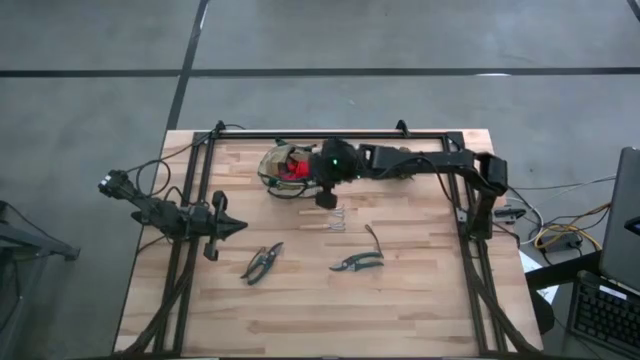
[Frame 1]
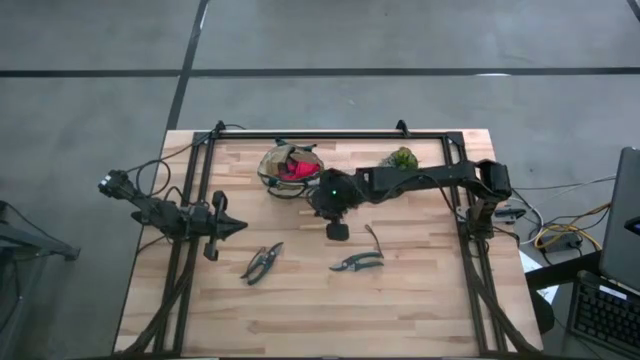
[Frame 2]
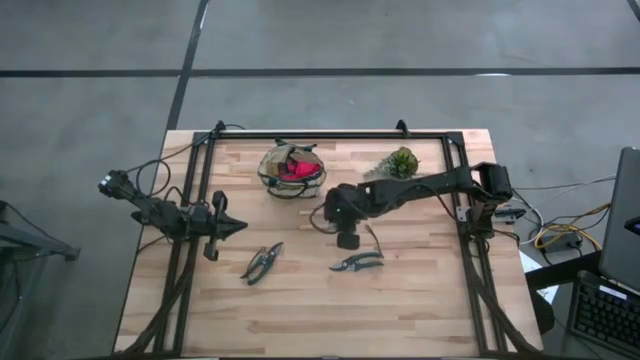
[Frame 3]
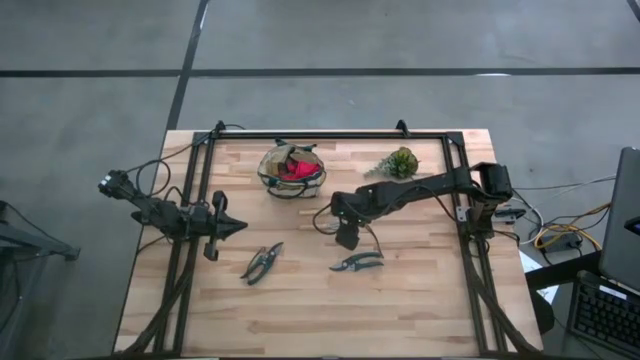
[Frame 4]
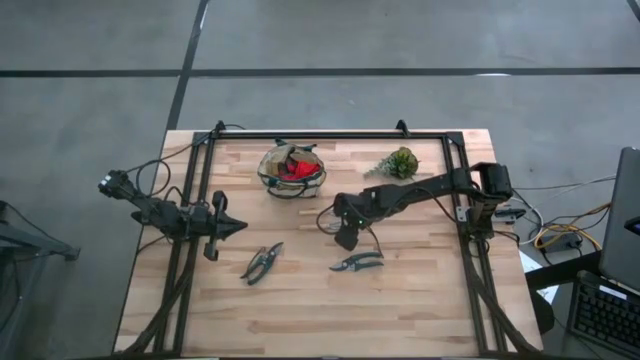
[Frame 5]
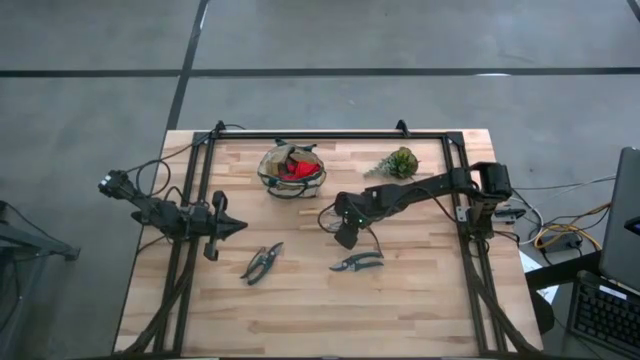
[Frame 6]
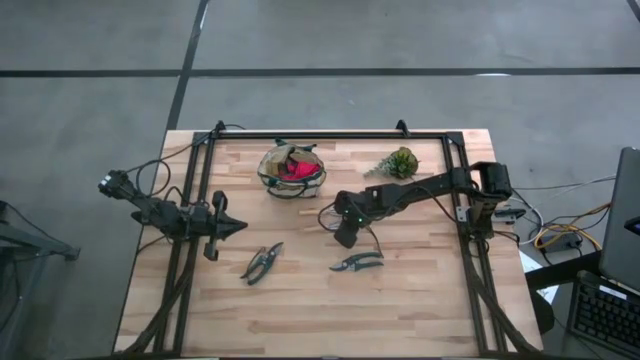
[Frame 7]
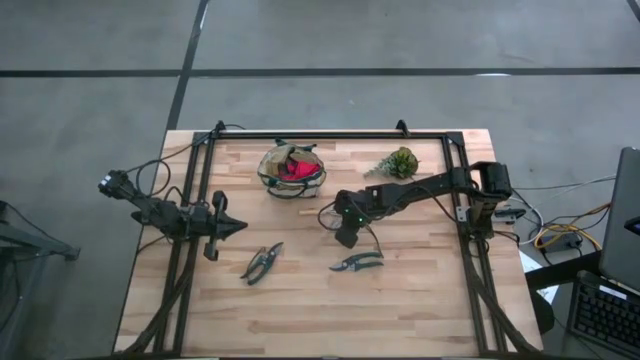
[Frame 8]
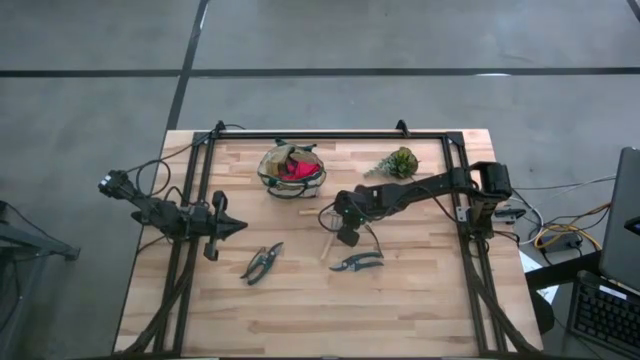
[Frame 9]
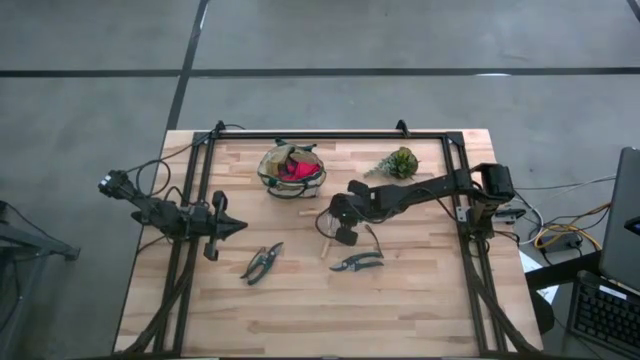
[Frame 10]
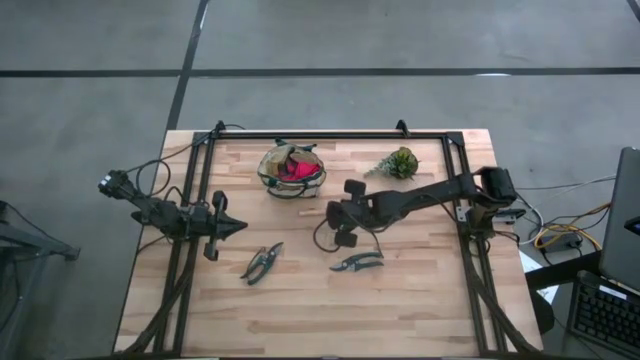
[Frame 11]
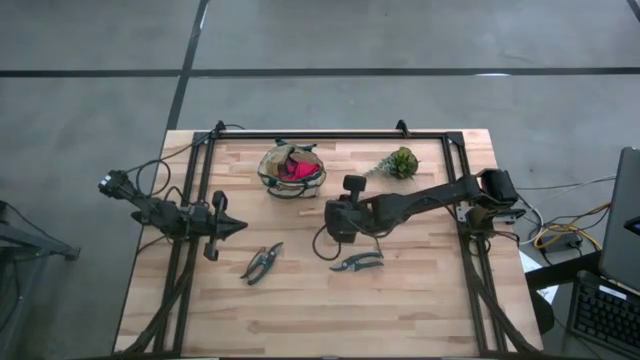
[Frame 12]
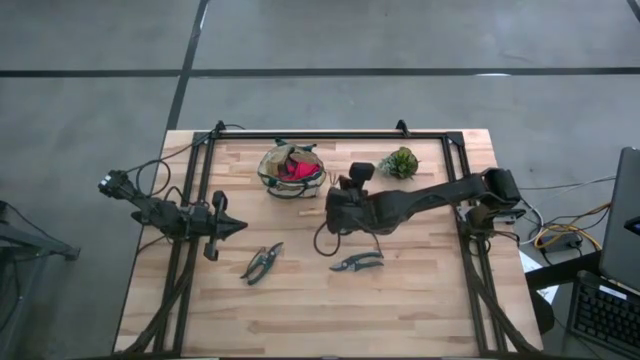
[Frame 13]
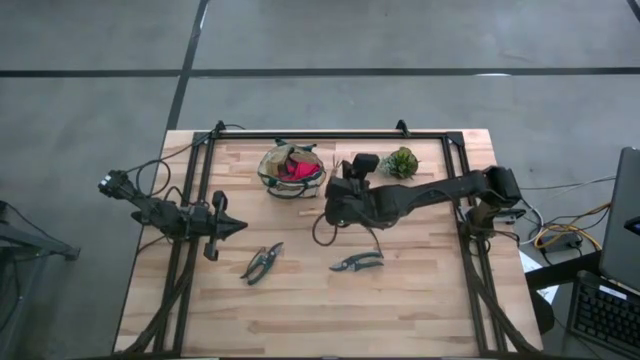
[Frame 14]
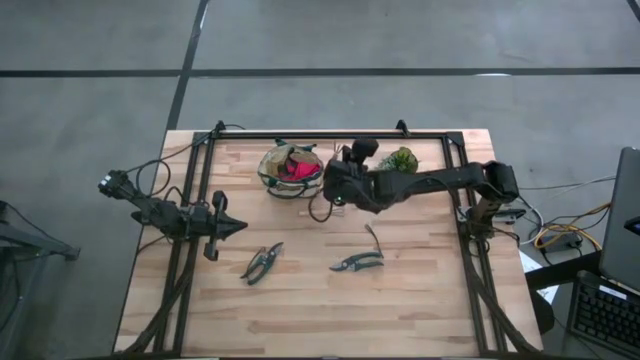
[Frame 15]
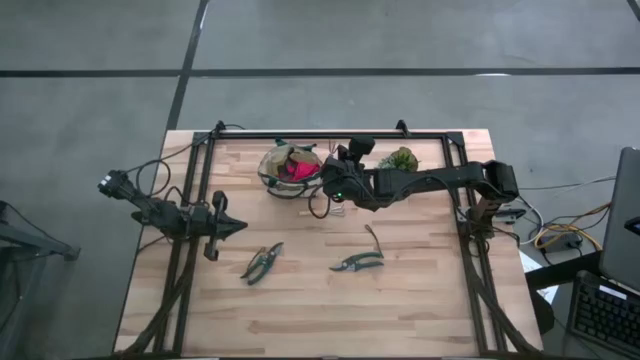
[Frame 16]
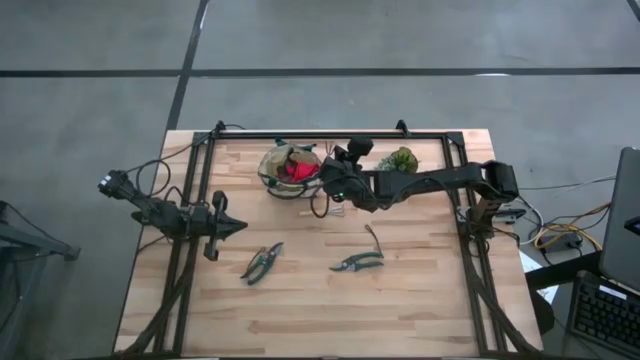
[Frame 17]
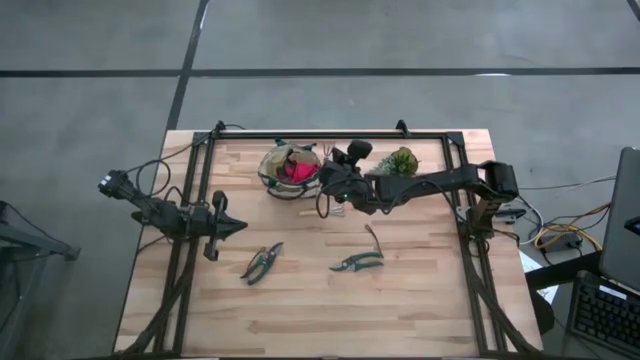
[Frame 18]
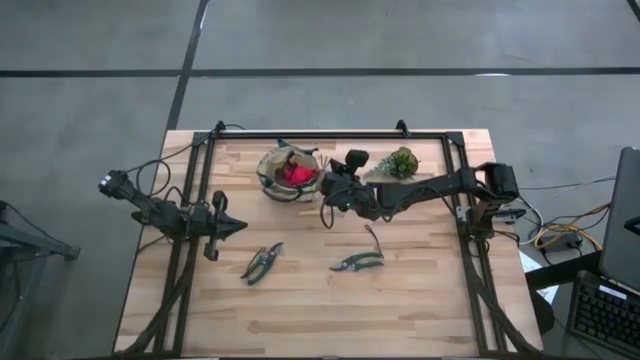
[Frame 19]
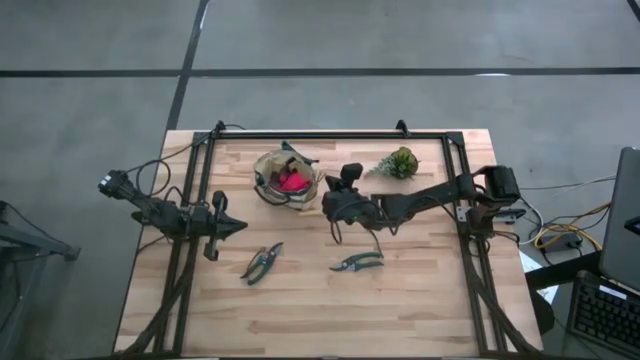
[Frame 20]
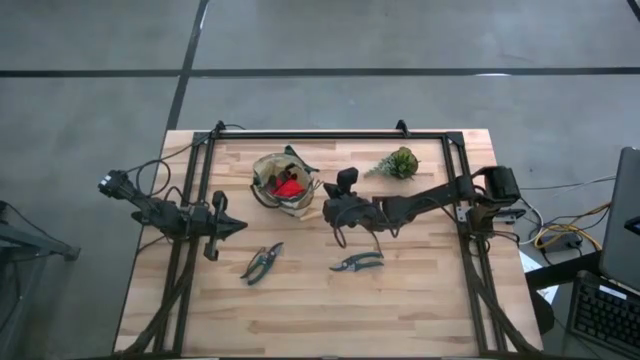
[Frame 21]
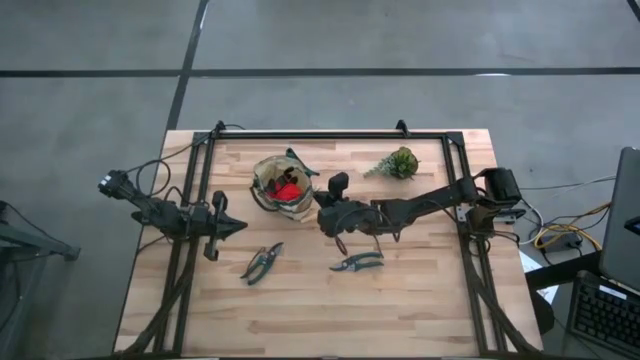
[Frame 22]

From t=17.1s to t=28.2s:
Task: Pick & Place Garden tools in Gardening bag
Put the bottom hand rake into the gardening bag

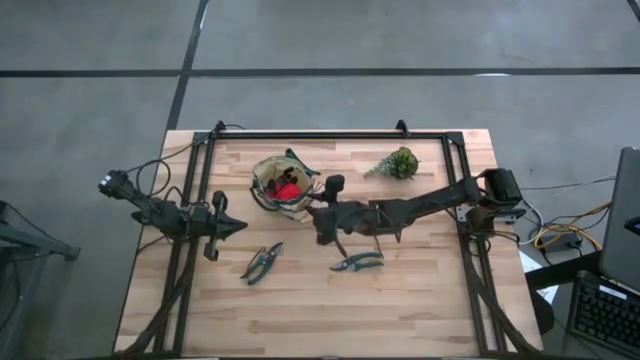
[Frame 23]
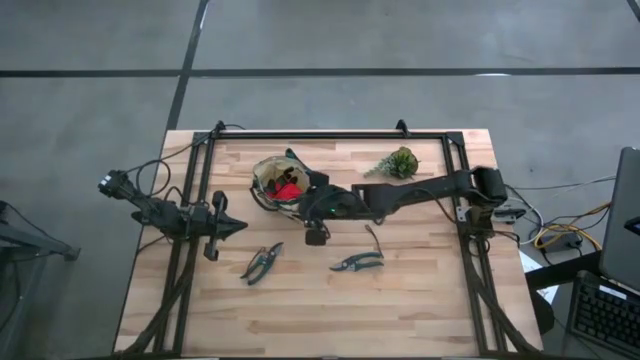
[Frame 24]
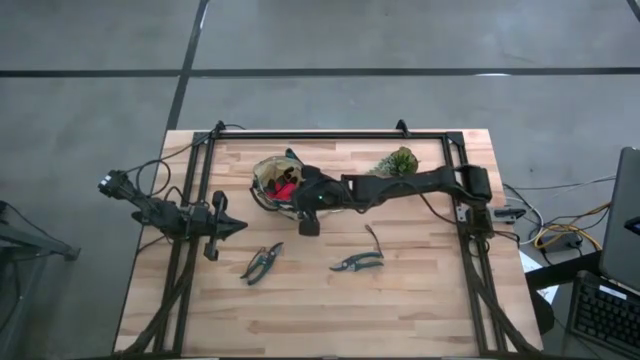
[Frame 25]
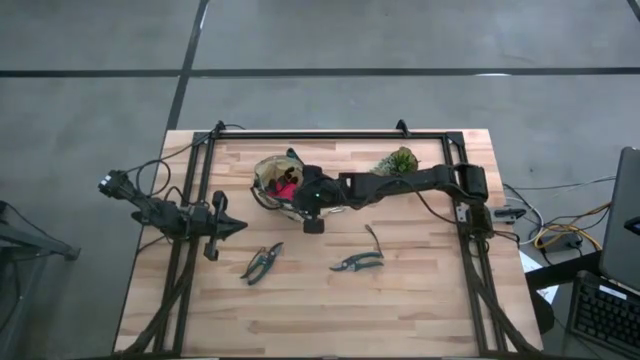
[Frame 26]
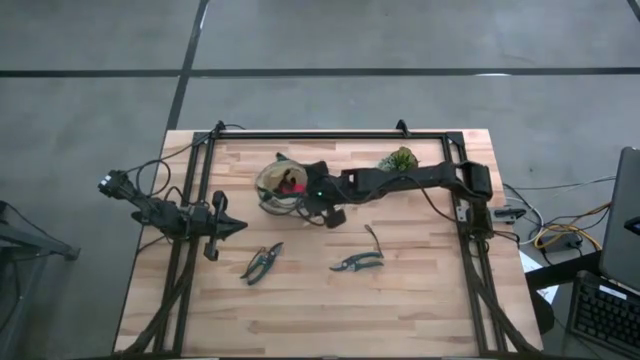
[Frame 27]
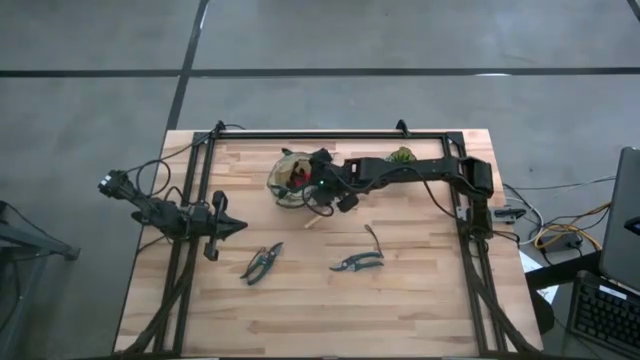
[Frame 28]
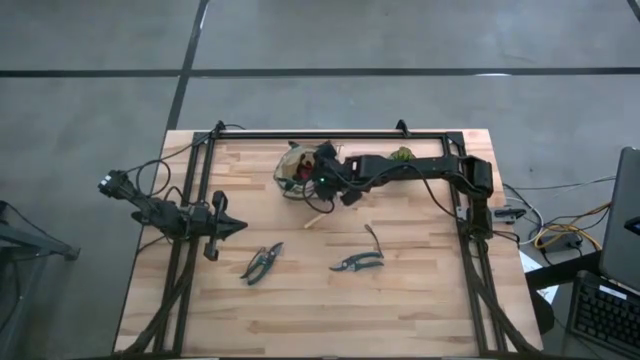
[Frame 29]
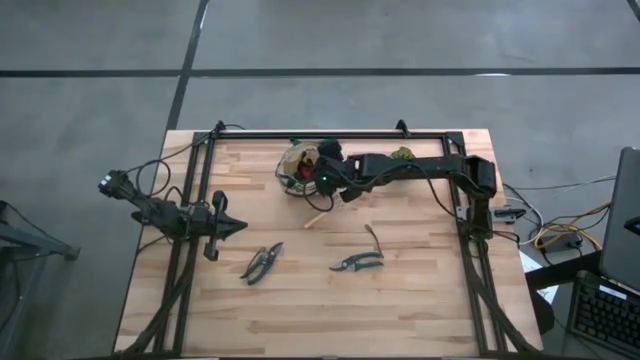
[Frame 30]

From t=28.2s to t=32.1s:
Adjust the gardening bag
